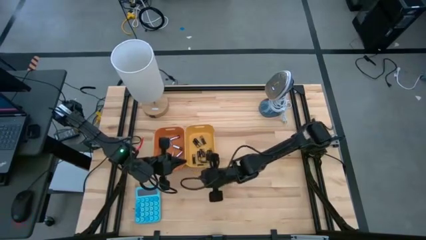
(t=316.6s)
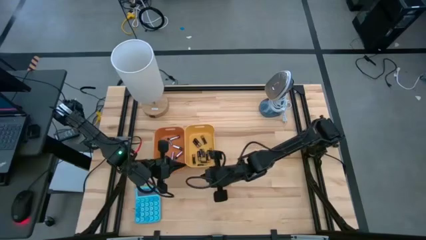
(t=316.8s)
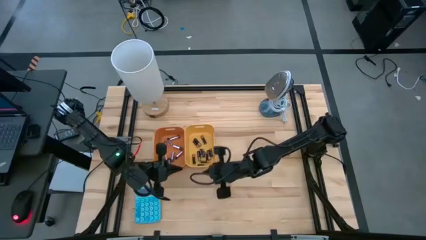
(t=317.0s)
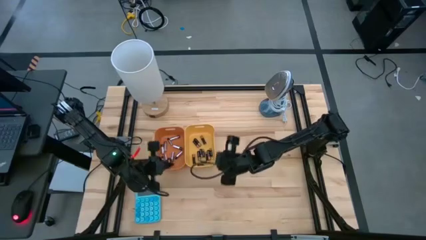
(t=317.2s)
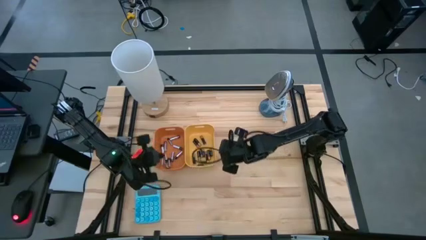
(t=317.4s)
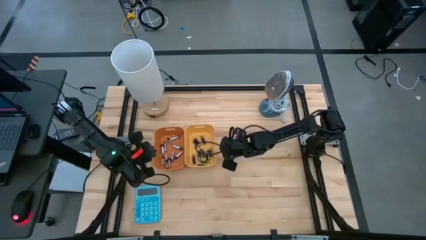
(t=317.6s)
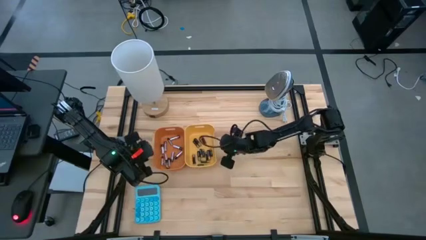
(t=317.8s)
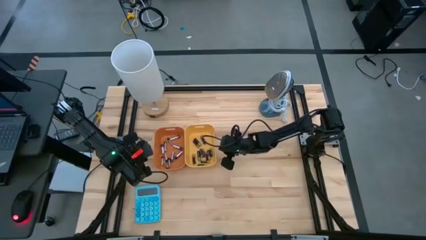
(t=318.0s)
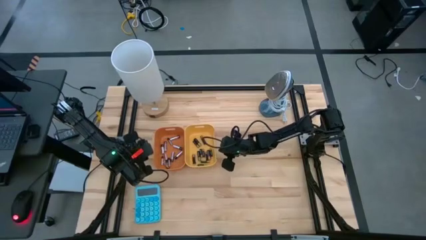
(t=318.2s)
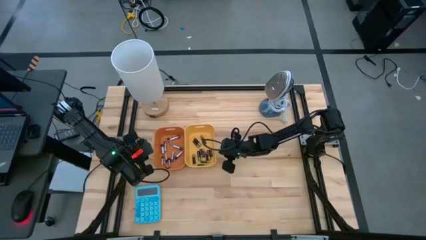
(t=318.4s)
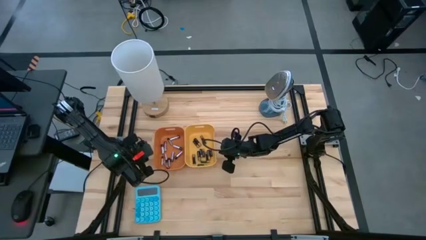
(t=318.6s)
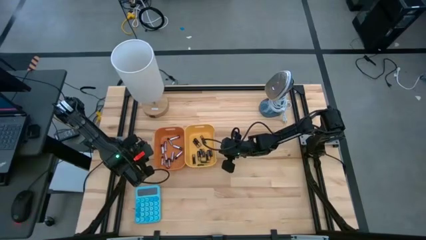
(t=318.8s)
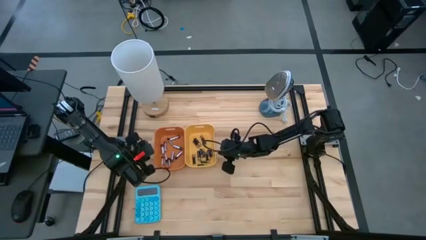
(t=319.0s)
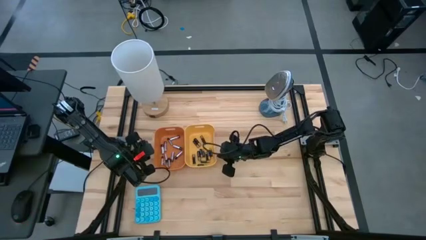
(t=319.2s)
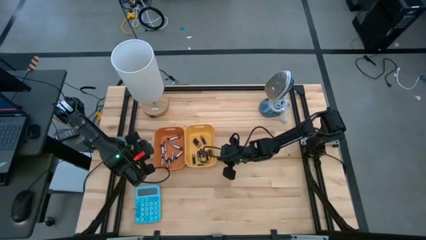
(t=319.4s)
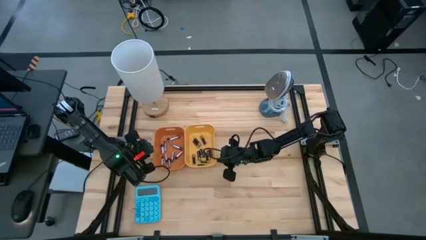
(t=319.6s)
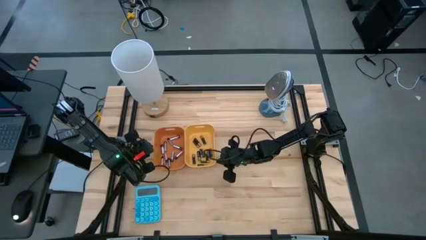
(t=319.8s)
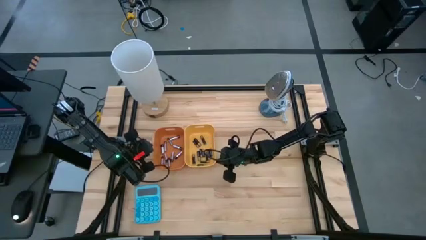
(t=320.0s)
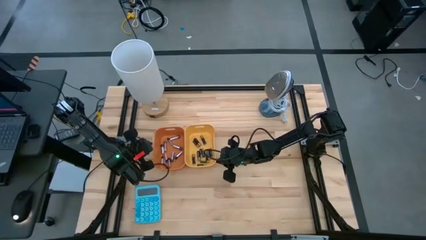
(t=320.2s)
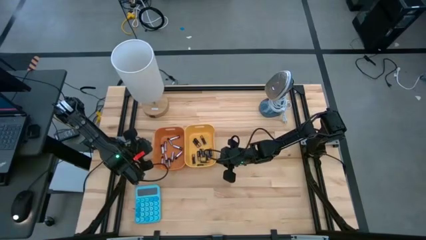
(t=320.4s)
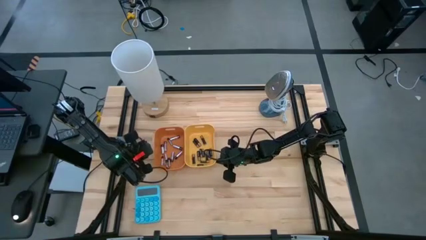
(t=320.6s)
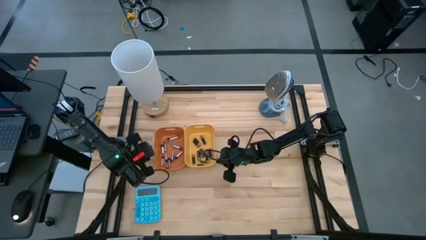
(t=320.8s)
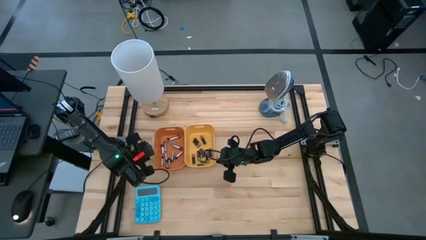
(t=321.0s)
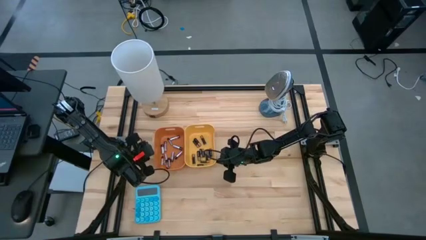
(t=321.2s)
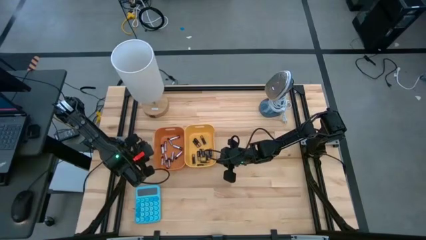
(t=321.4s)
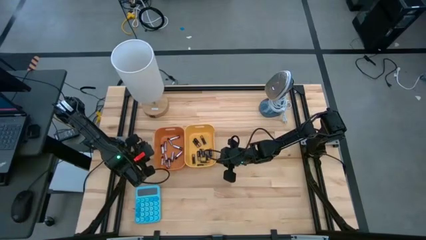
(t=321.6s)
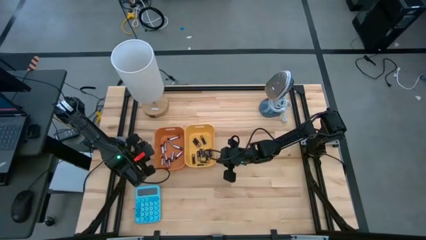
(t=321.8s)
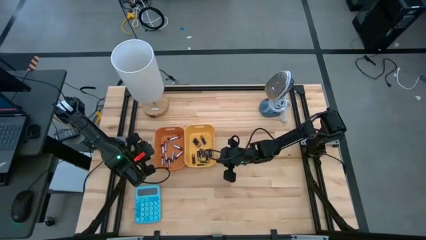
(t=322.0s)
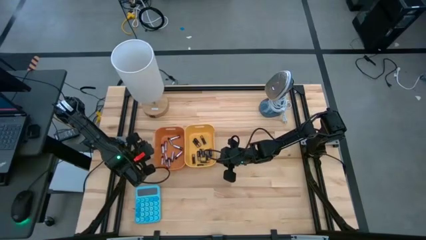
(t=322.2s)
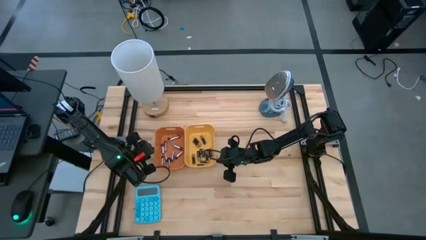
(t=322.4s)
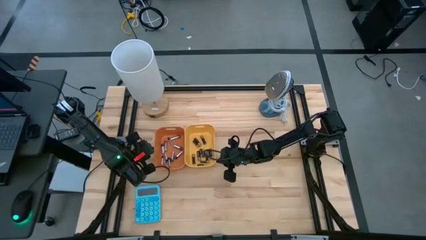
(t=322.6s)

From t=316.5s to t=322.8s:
Task: Sort batteries
Adjust the bins

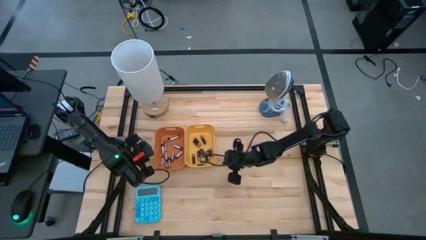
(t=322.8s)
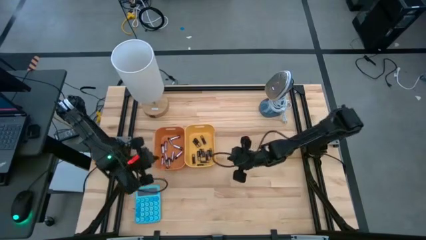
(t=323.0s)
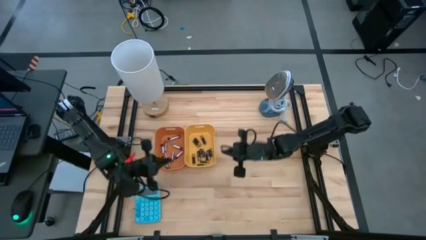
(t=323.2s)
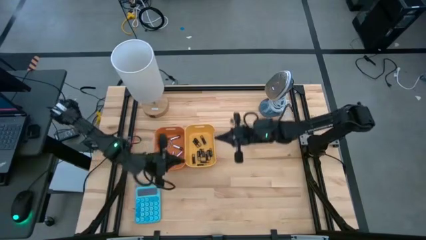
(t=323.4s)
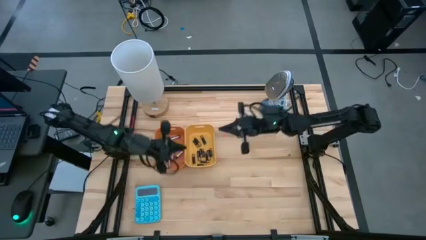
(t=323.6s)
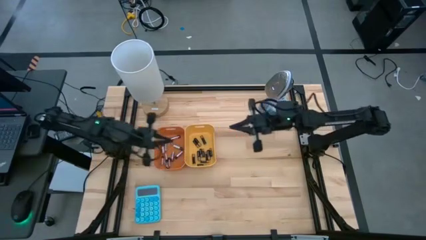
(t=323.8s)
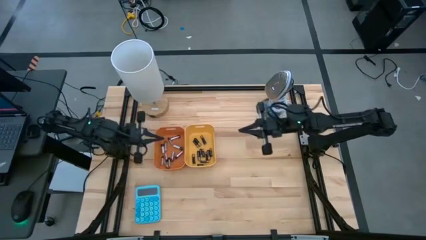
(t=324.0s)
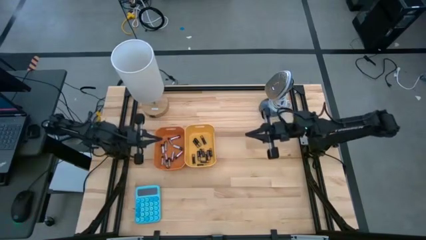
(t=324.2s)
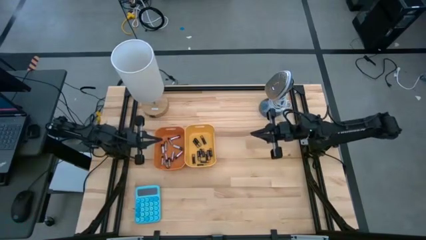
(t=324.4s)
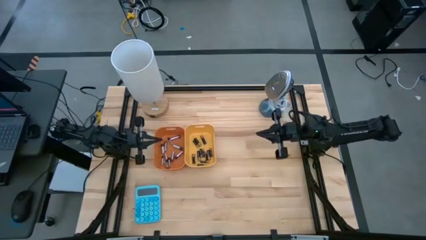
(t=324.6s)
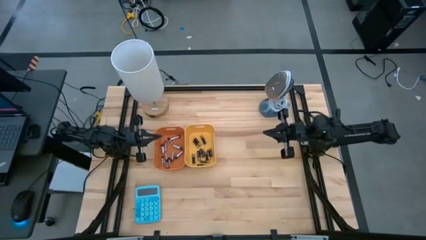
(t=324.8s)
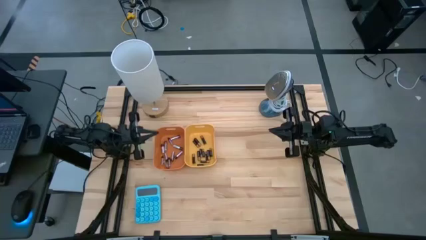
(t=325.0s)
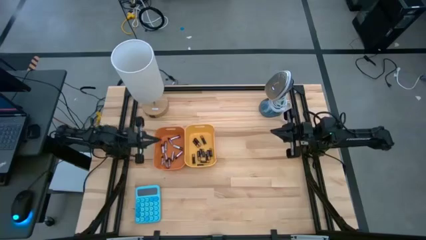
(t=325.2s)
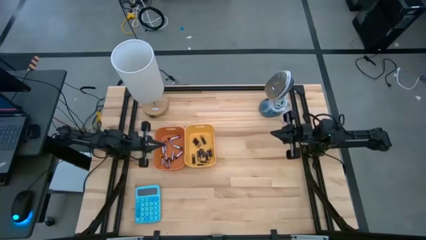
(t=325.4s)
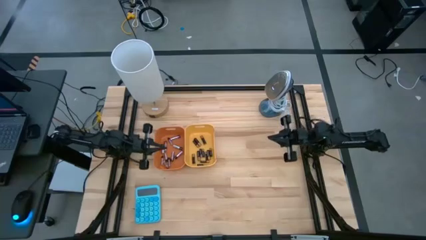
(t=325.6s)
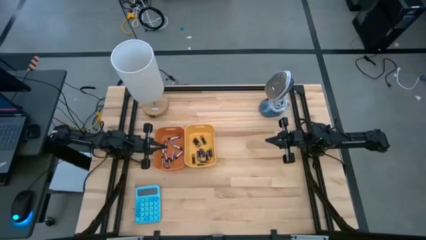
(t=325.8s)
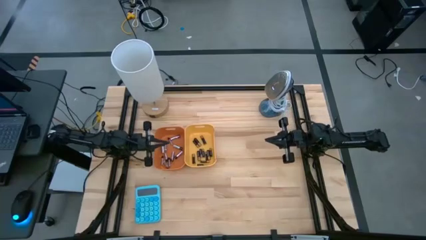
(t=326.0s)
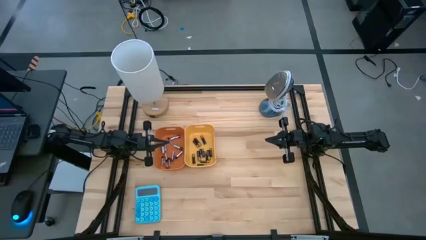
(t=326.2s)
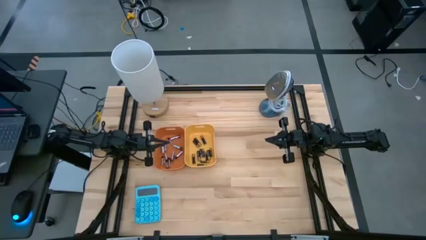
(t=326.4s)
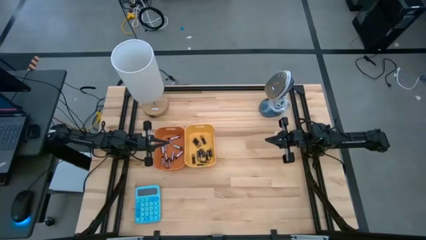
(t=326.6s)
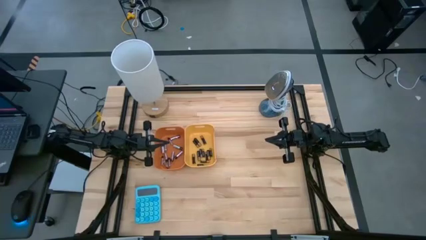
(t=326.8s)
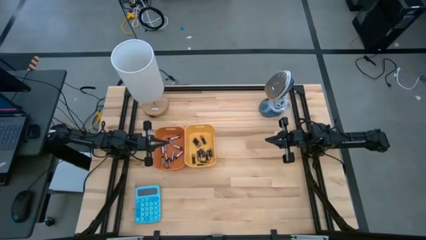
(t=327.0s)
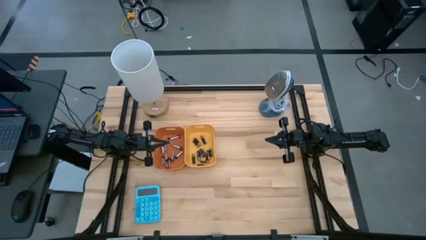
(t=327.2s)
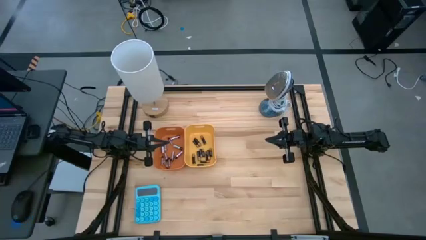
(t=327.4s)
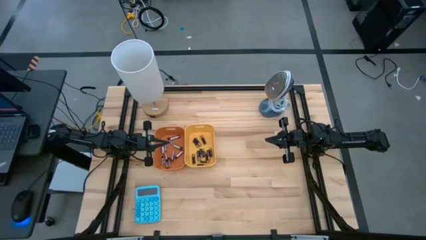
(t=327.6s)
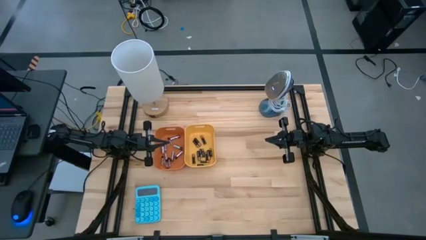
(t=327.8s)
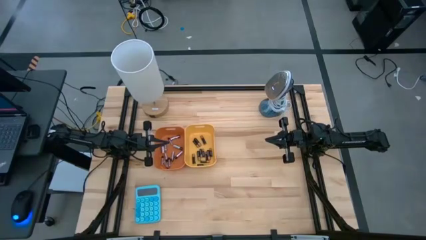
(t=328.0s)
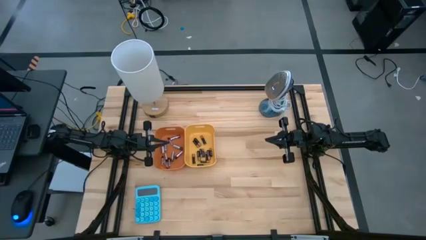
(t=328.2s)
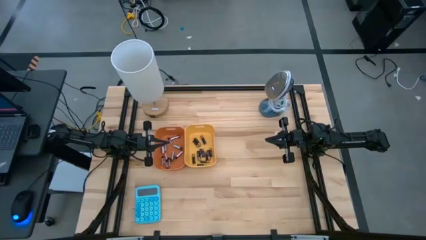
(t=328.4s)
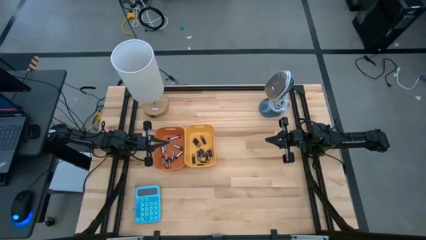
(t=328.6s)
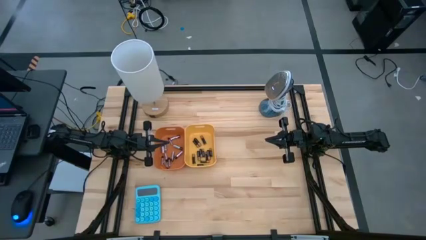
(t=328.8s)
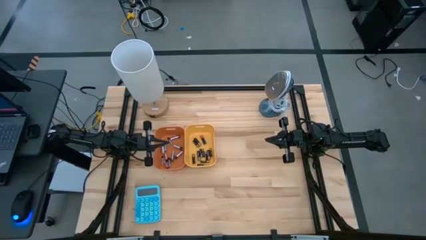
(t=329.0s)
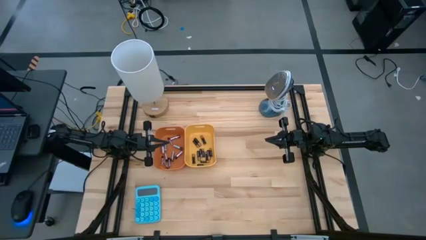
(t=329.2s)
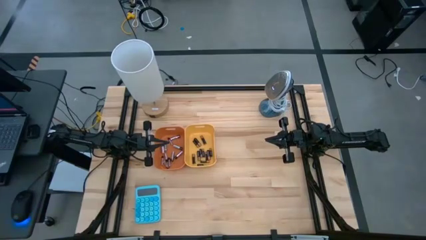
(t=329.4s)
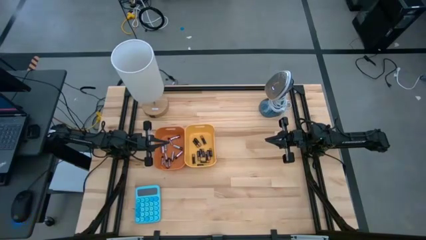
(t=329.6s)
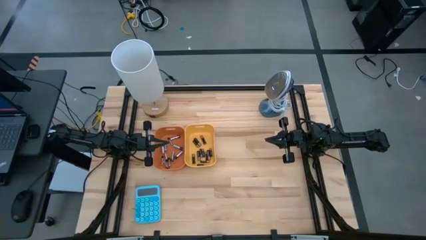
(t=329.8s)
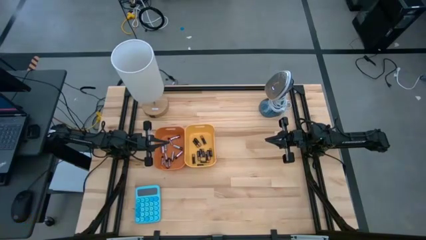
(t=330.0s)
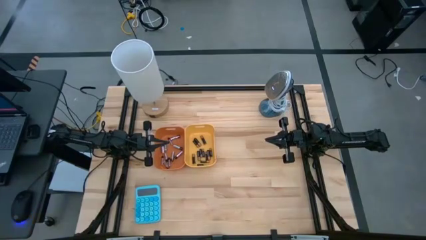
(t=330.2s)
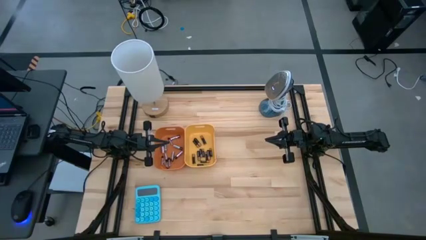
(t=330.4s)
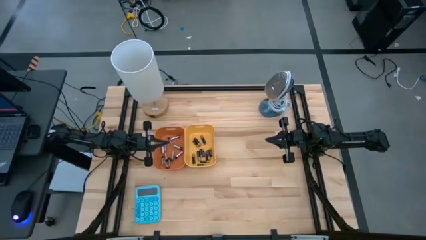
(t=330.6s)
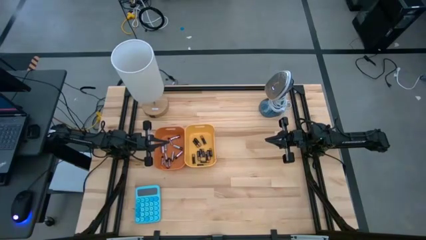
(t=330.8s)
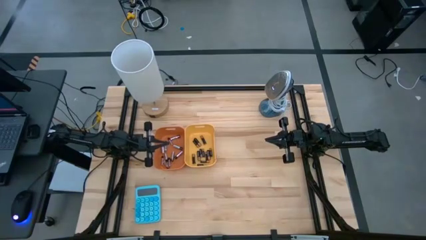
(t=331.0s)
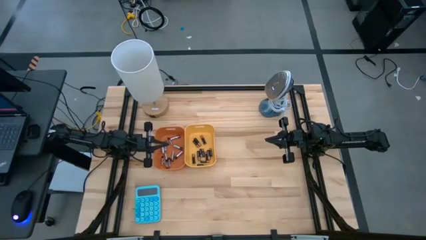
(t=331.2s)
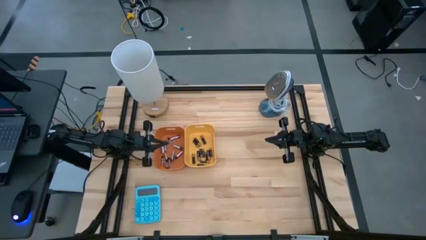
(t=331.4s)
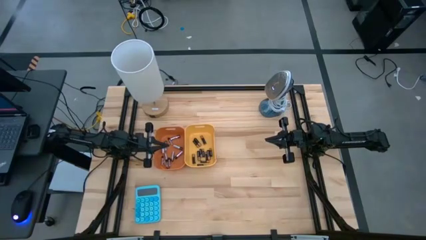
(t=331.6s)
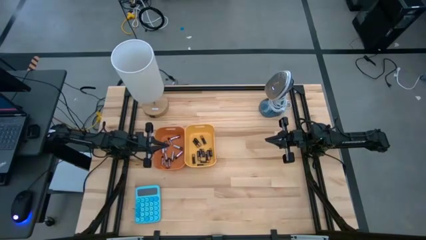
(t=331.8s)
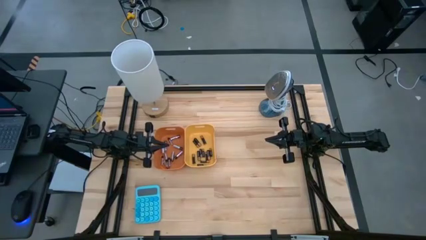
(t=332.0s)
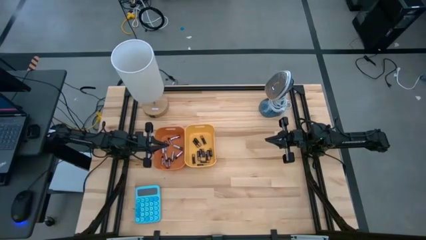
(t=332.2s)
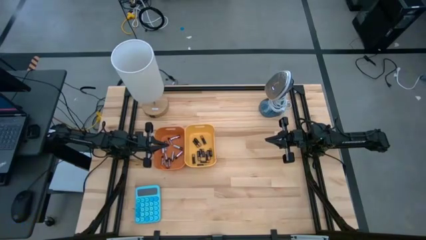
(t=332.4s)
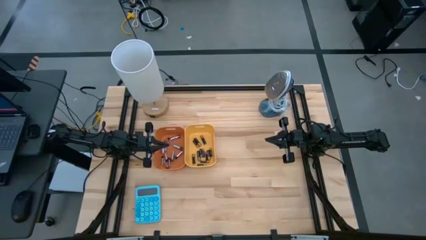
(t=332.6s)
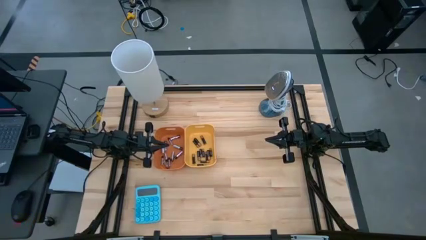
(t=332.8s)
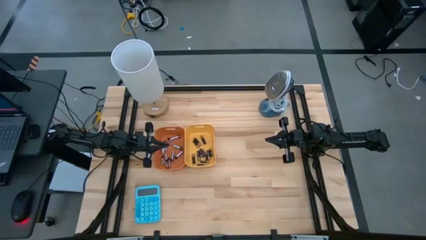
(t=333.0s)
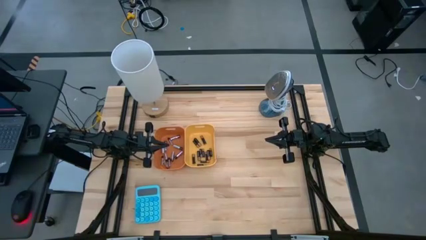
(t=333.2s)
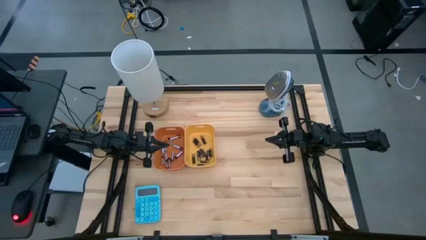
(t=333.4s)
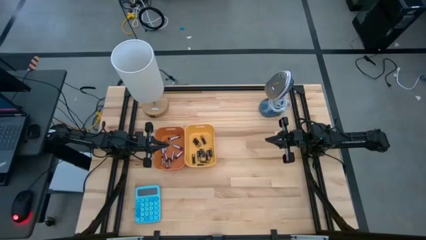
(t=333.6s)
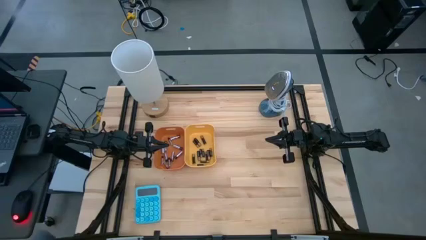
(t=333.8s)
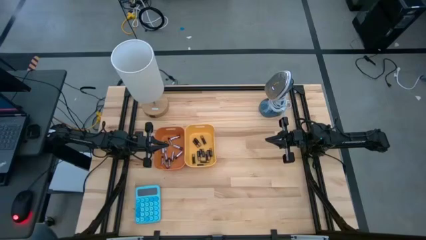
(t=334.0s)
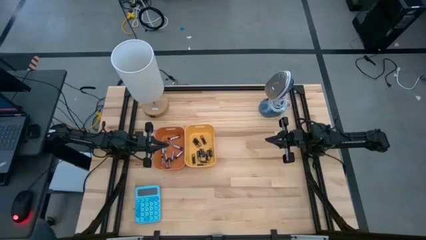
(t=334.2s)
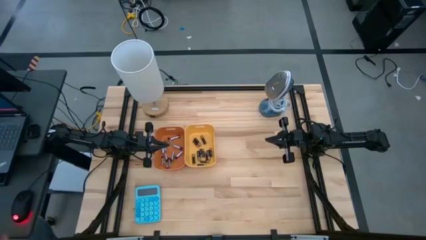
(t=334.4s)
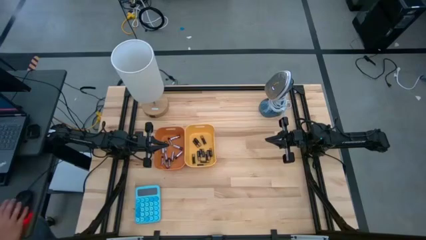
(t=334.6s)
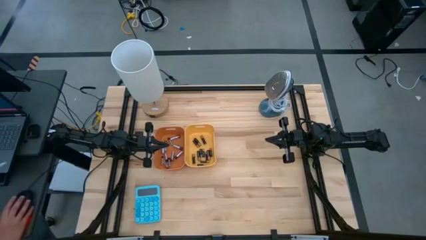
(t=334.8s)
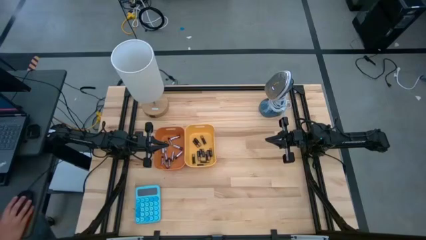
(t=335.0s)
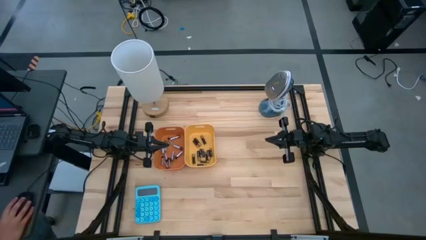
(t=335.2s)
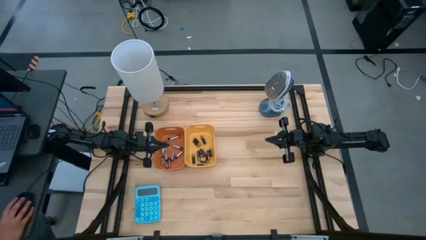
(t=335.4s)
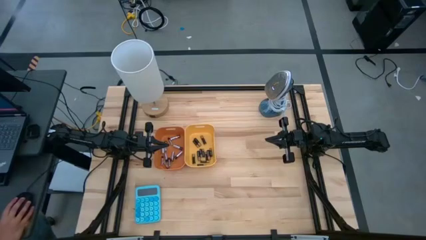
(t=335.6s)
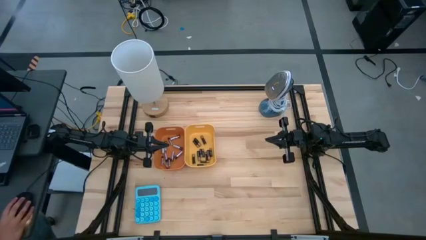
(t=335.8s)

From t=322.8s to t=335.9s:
Return to Home Position
